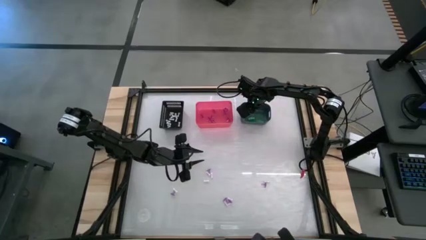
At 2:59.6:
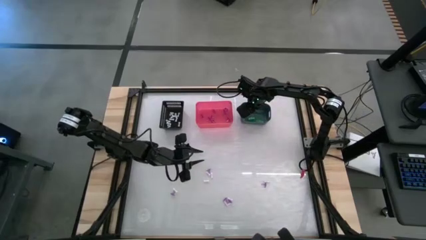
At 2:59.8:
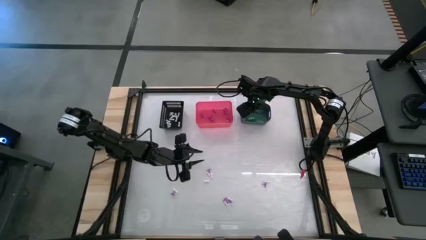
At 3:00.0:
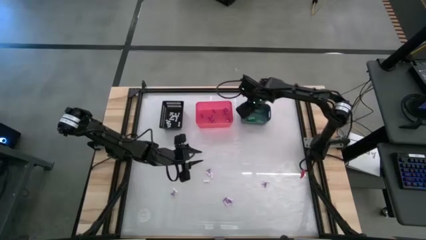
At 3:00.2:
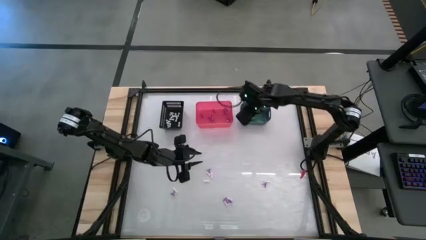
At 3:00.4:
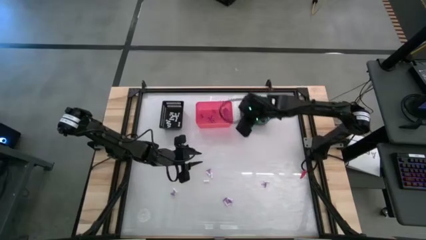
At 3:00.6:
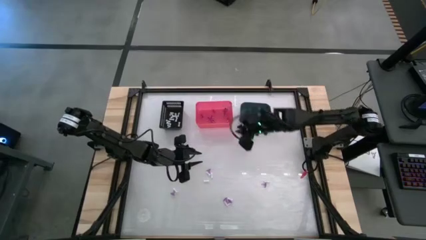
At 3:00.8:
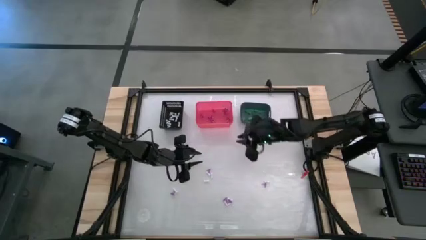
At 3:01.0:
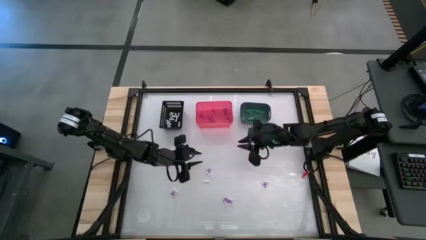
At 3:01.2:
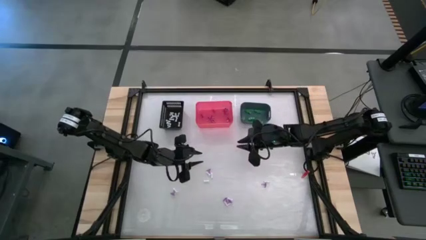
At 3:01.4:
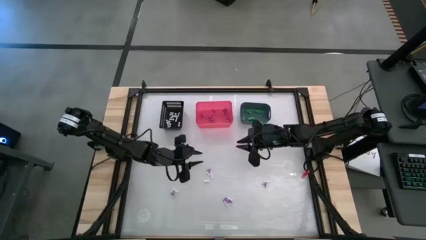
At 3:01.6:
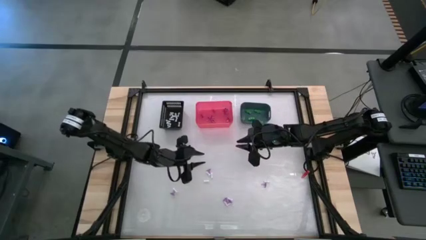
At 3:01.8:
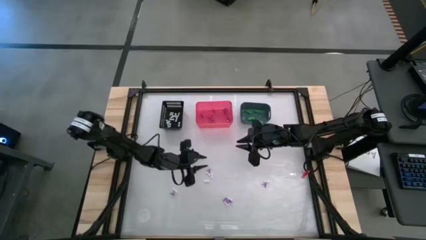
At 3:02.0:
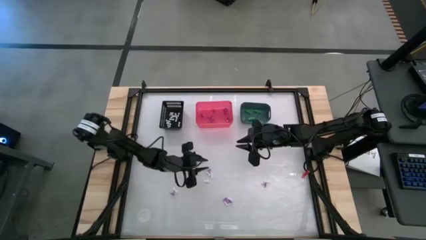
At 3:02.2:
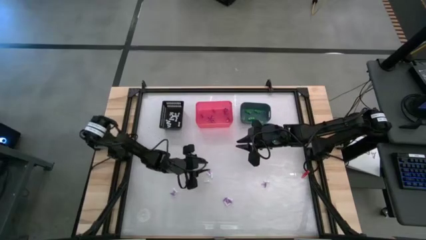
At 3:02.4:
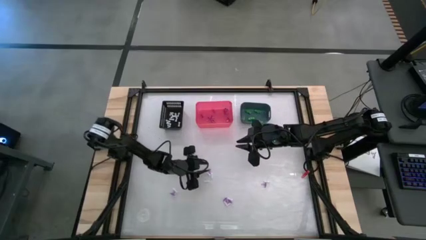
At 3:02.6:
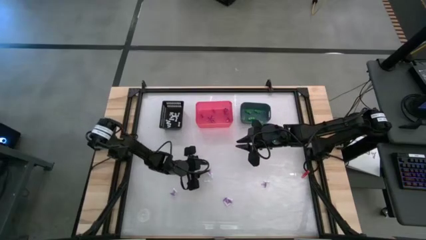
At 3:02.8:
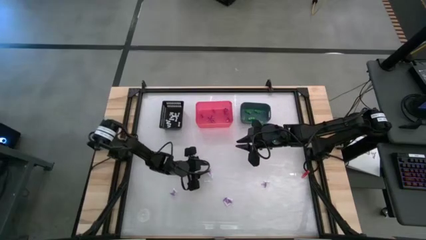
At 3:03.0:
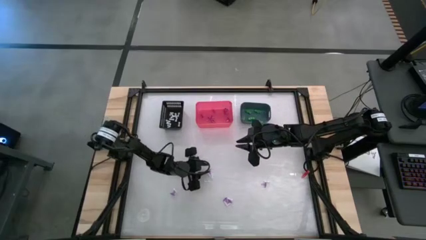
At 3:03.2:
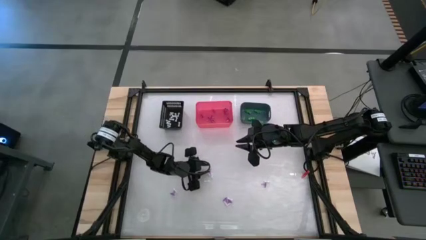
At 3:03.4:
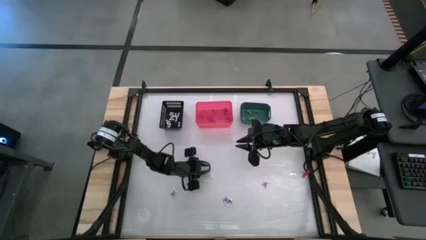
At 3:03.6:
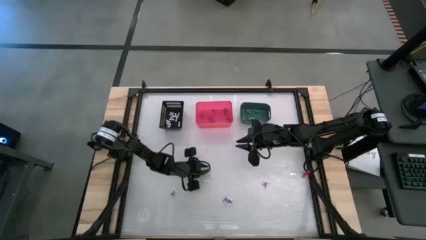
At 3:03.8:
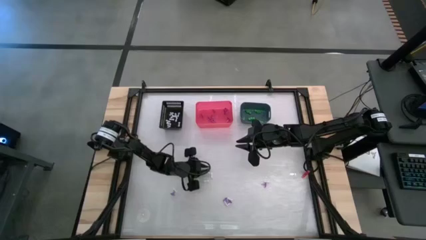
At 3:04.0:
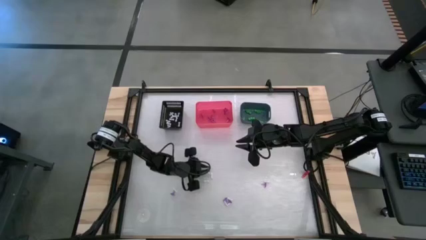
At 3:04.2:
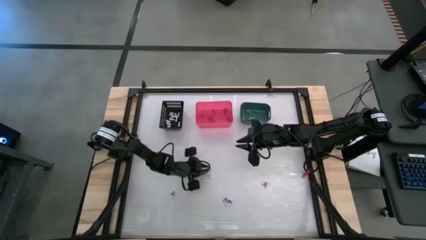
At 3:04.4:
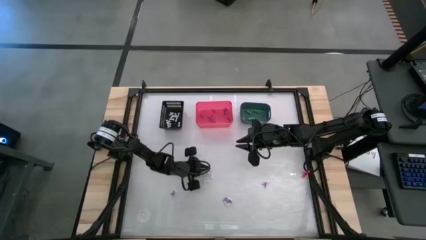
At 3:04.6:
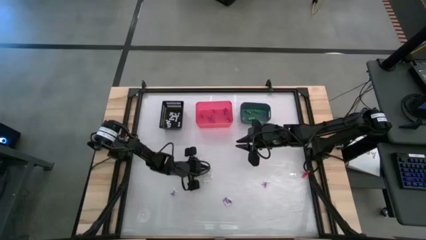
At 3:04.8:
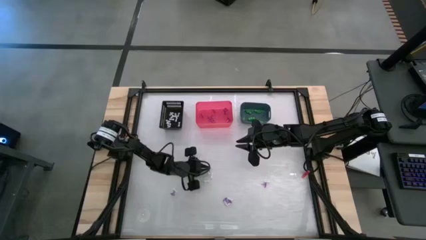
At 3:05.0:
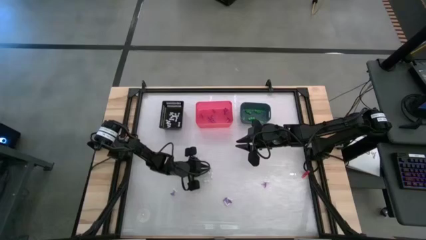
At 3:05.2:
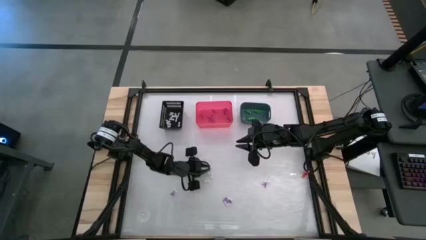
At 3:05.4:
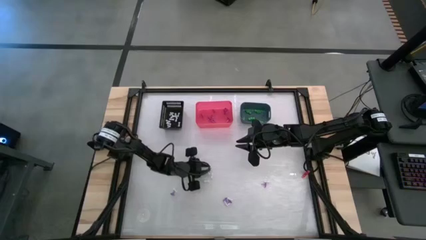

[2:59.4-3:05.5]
Task: Sort Halloween decoration
Put the purple hat toy into the pink bin

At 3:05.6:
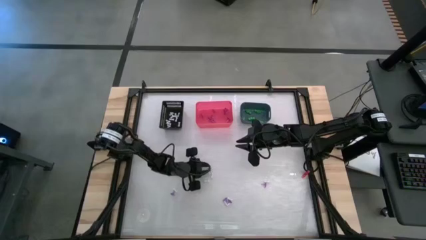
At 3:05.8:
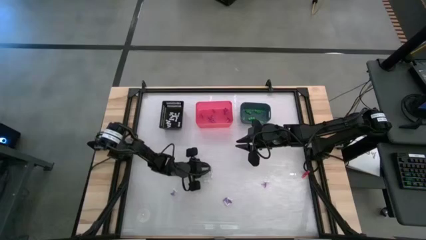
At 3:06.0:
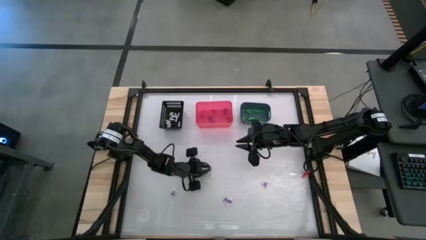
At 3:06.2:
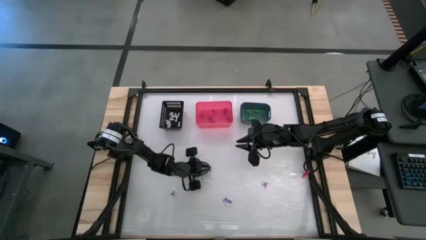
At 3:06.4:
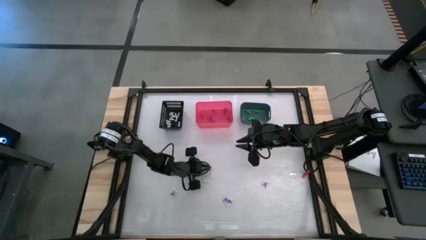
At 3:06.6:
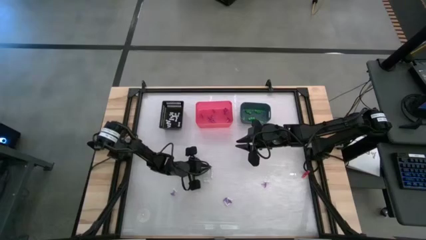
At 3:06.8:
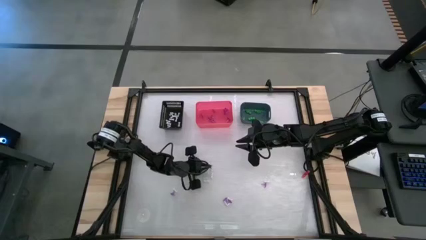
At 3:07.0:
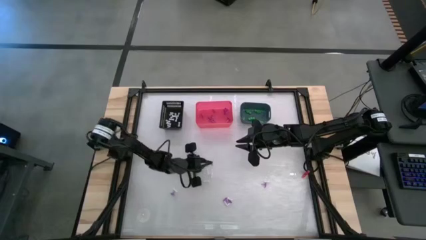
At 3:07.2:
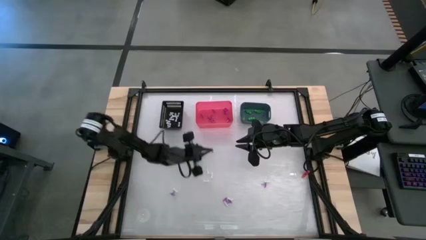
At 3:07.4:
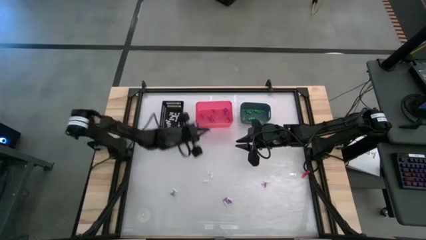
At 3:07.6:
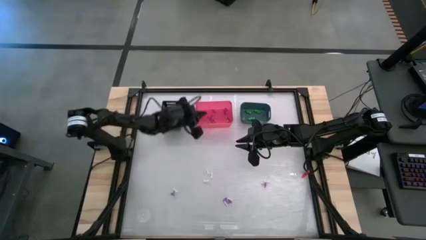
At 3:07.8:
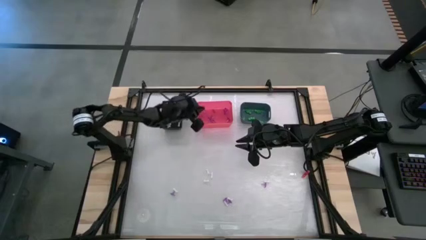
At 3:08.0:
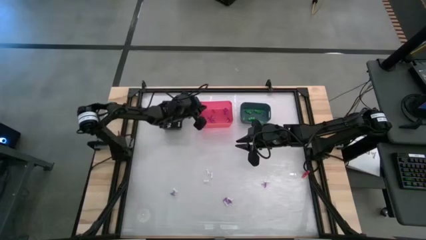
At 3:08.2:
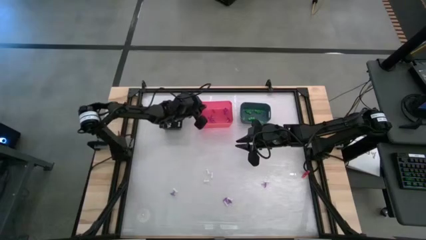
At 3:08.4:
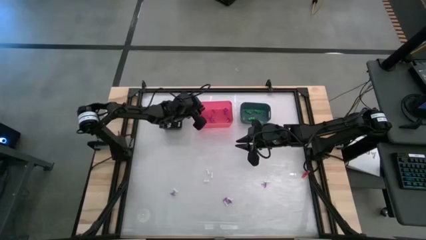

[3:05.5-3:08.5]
Put the purple hat toy into the pink bin

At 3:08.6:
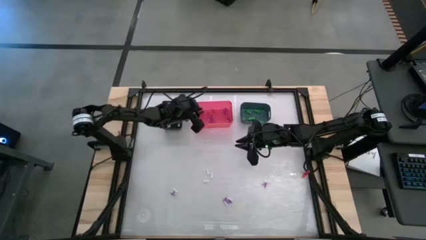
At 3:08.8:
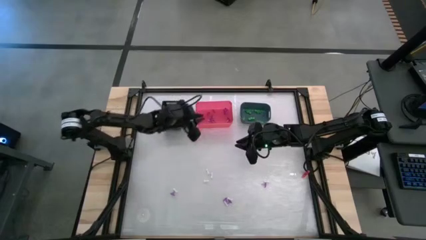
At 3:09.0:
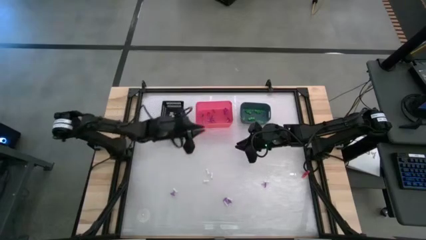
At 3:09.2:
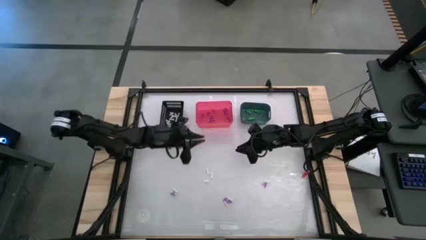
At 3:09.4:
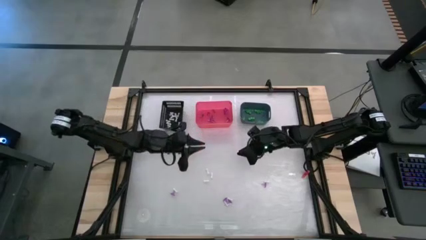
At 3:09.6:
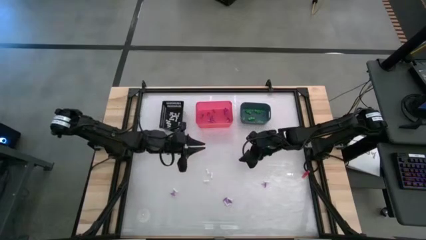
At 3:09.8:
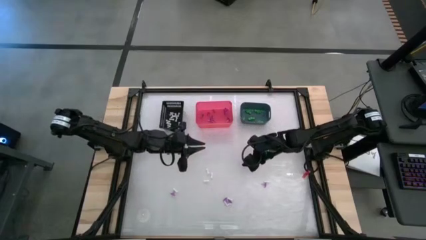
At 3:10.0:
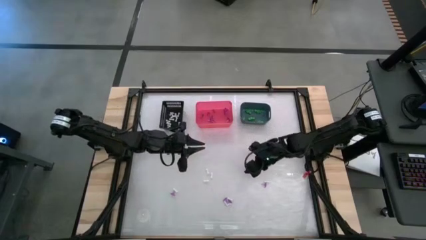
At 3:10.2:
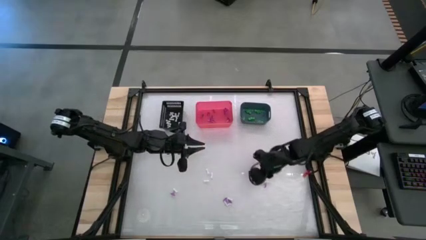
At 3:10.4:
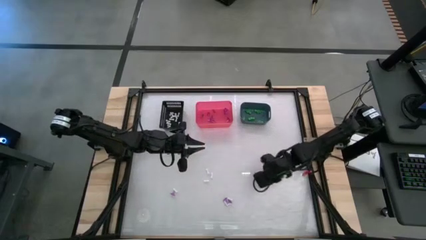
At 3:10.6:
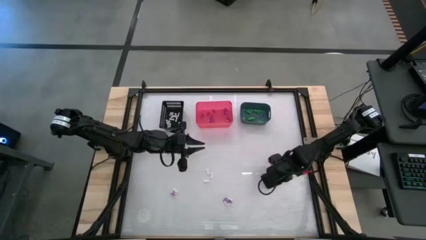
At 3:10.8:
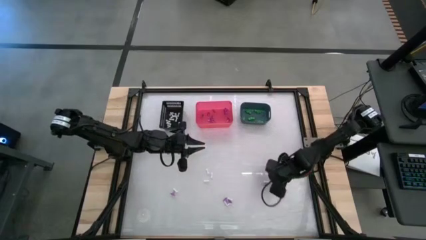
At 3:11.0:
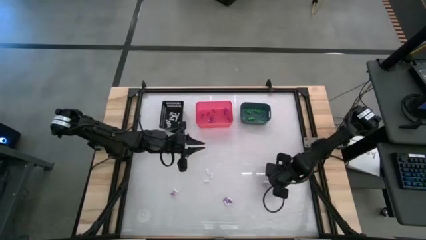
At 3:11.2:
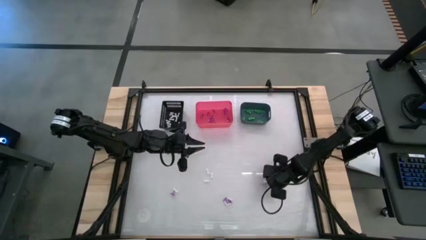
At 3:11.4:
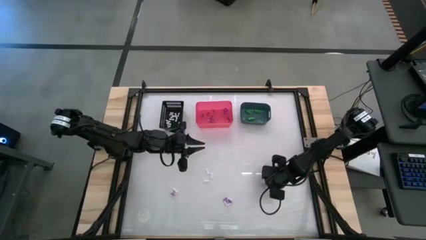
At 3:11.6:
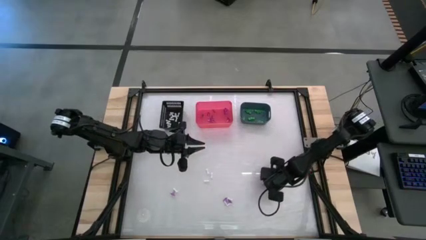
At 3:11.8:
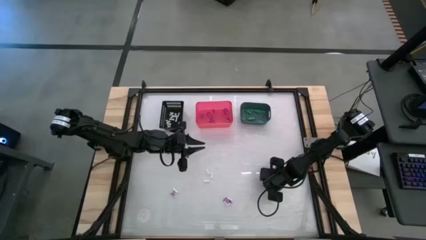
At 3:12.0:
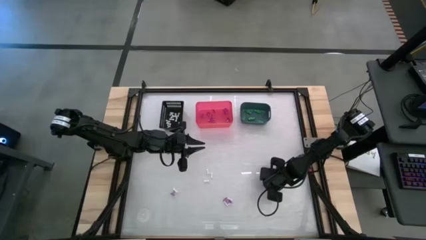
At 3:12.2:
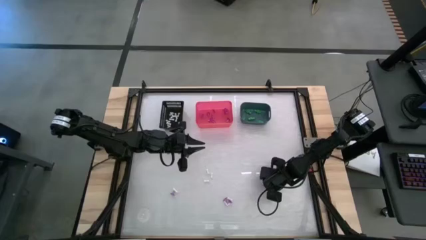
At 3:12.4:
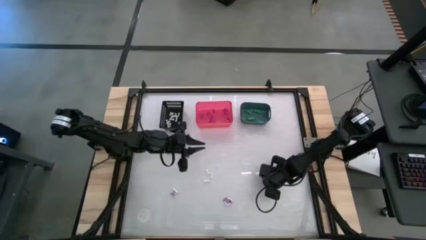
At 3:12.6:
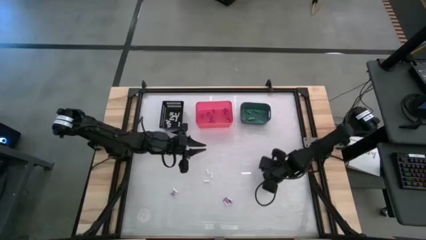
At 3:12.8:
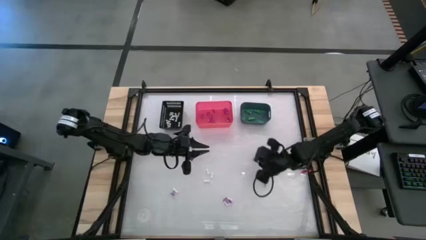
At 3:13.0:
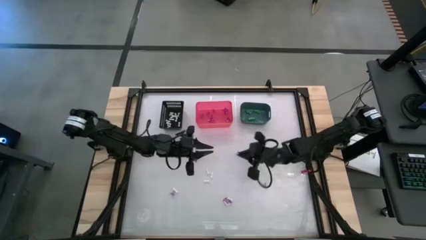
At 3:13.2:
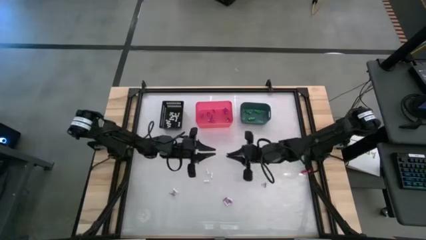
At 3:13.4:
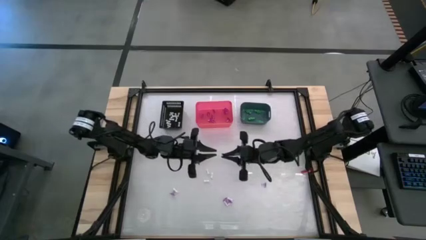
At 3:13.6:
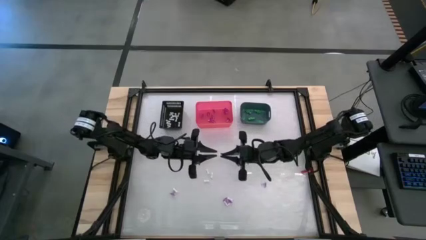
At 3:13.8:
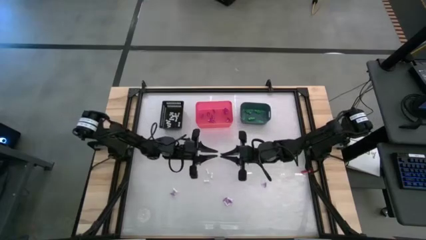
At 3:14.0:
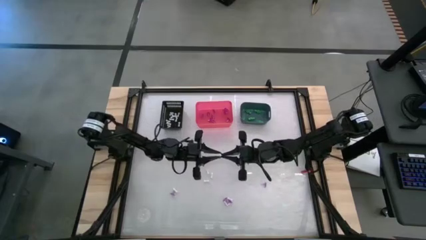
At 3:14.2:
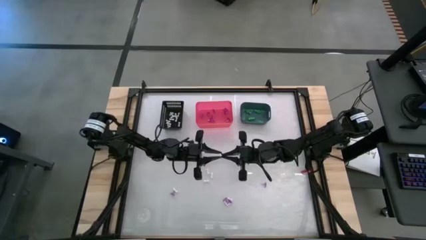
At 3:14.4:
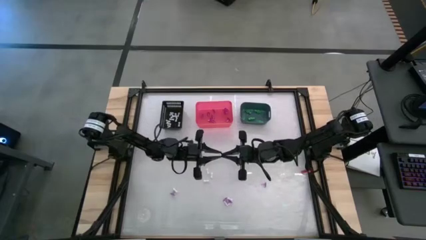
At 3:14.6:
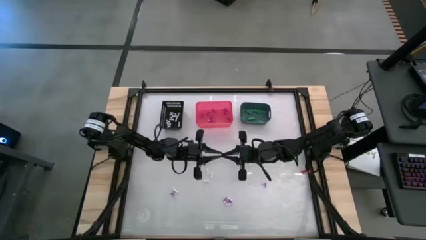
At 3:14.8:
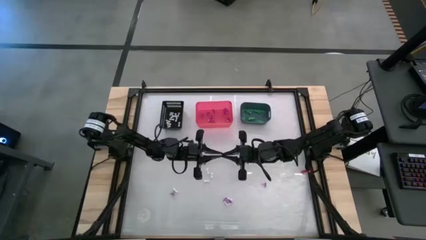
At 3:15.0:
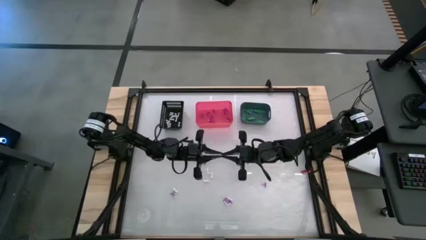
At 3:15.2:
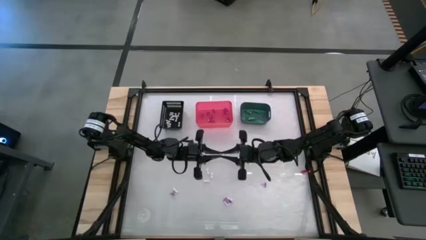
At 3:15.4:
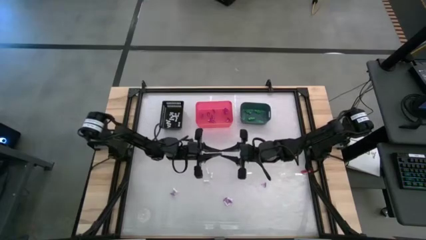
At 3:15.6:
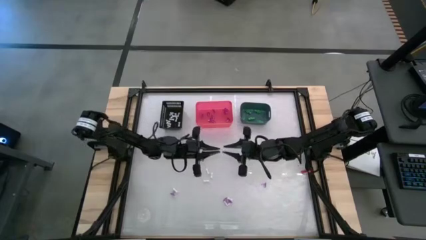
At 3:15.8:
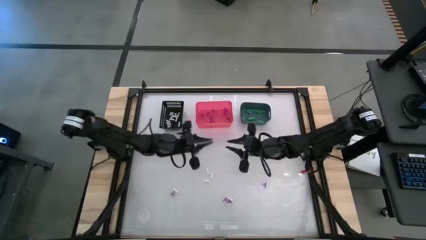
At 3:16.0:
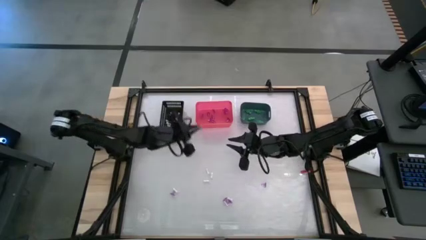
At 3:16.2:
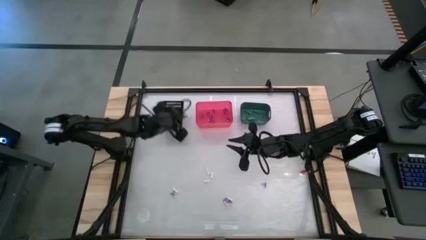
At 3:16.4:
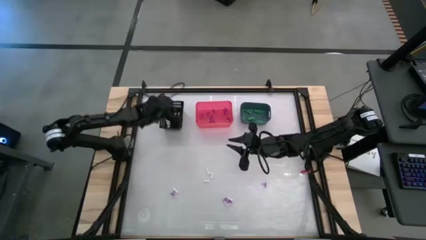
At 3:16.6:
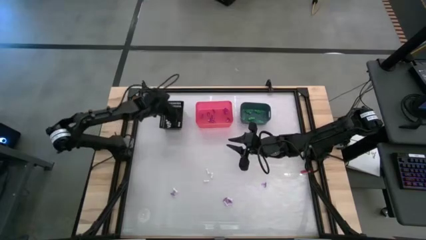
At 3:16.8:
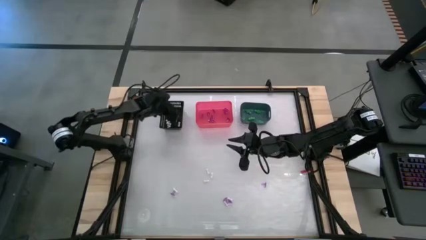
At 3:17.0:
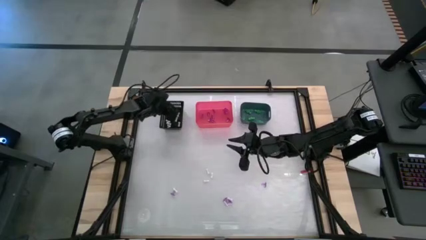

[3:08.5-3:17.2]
Put the white bone toy into the black bin
